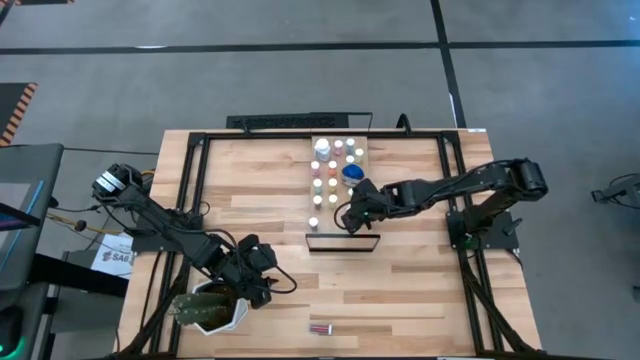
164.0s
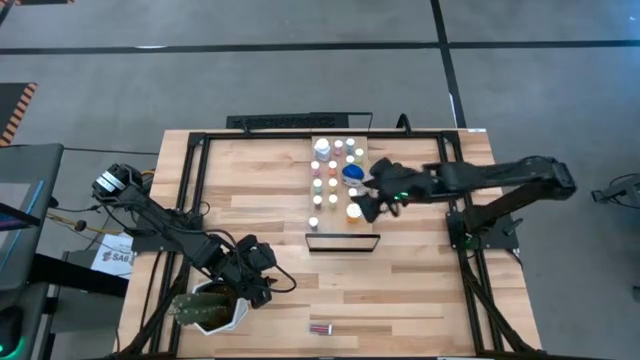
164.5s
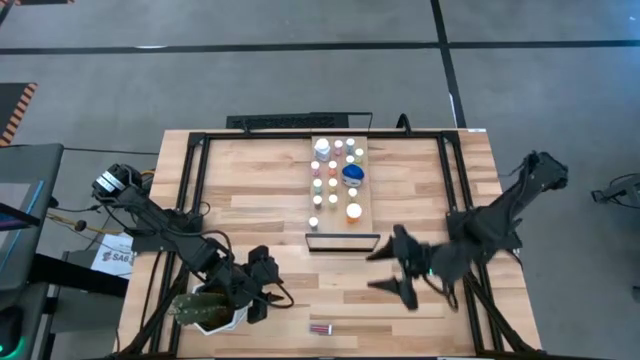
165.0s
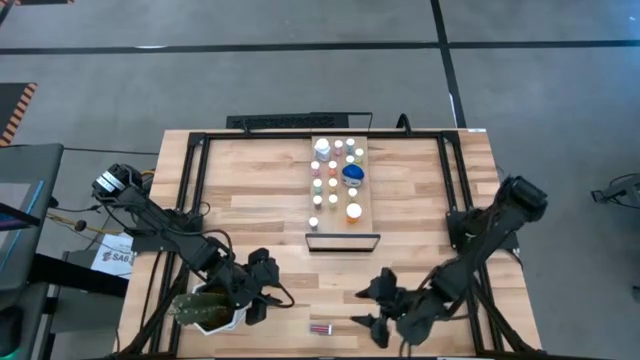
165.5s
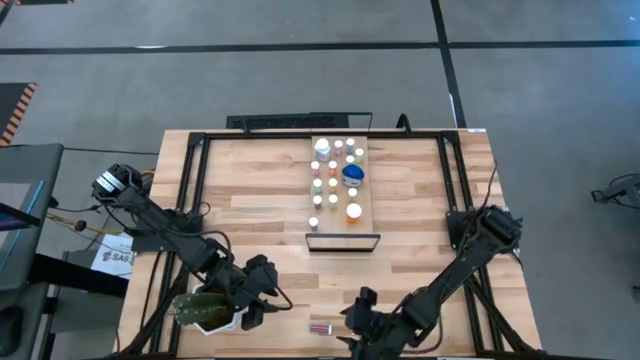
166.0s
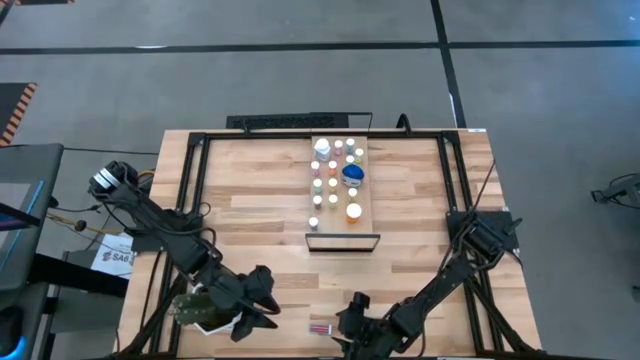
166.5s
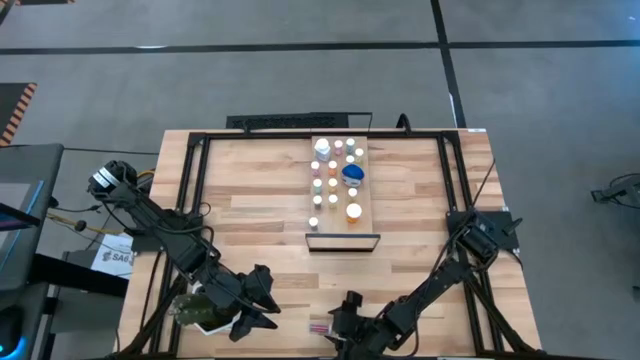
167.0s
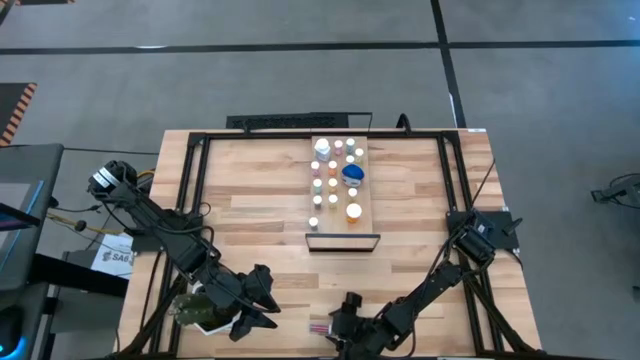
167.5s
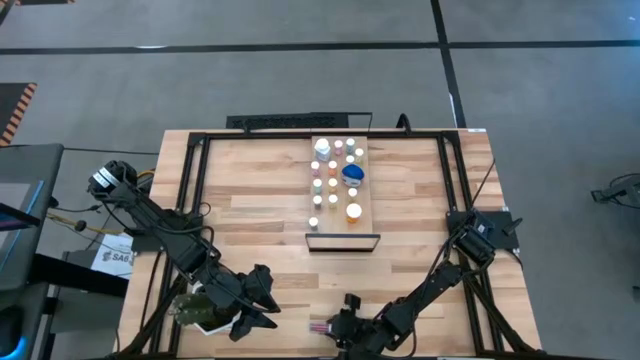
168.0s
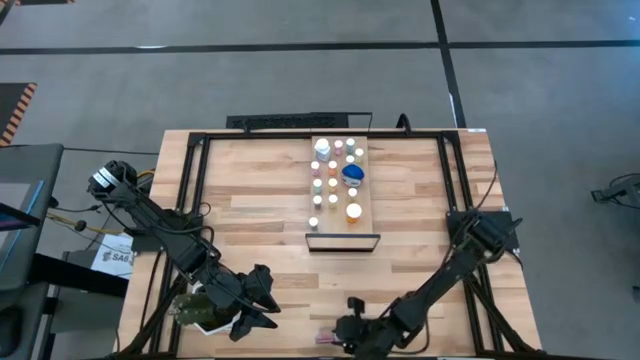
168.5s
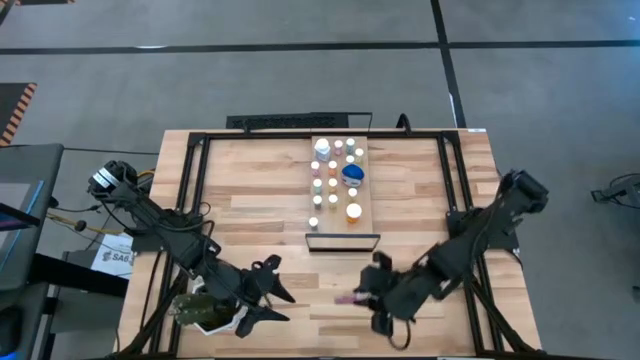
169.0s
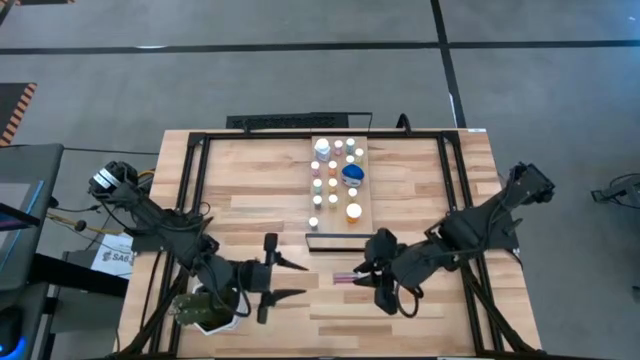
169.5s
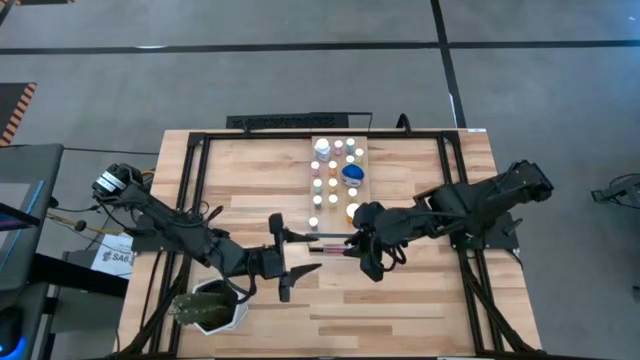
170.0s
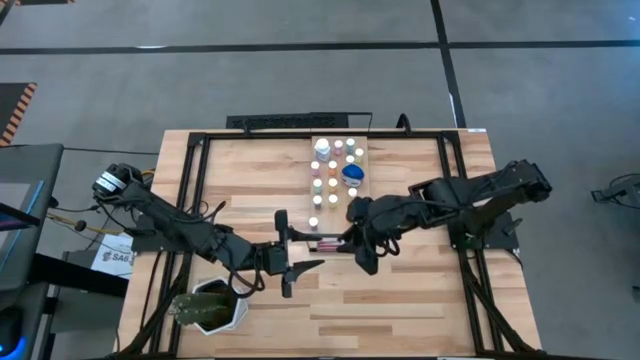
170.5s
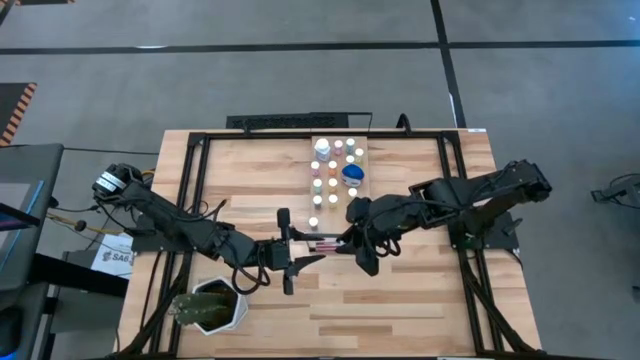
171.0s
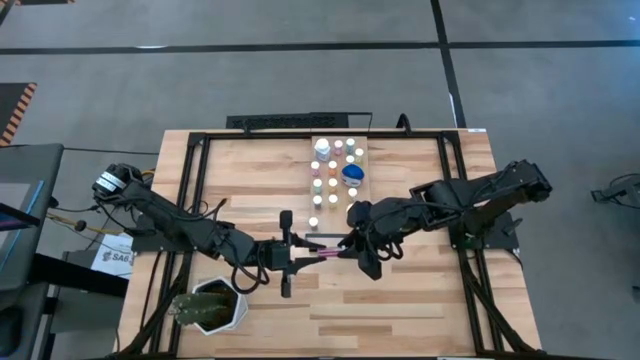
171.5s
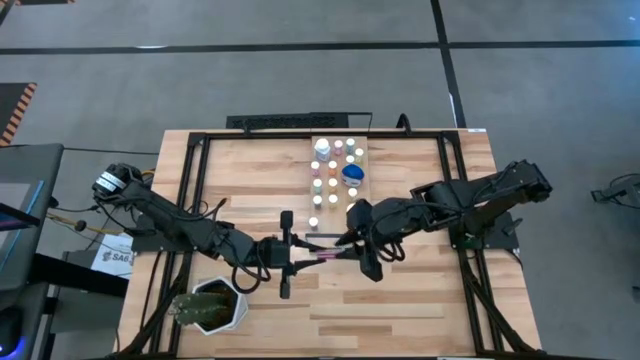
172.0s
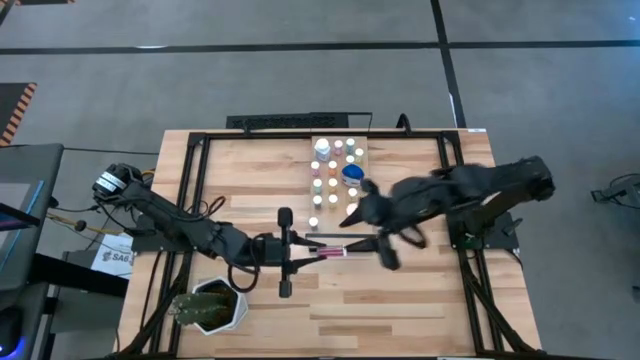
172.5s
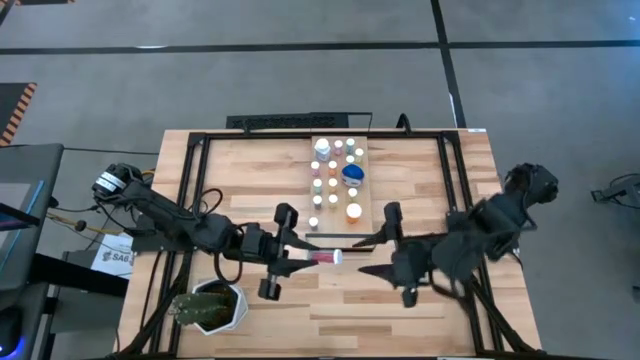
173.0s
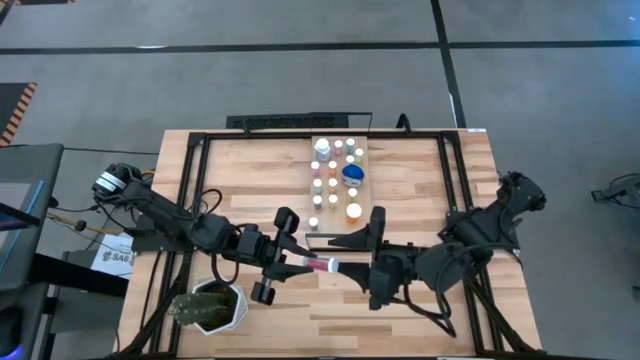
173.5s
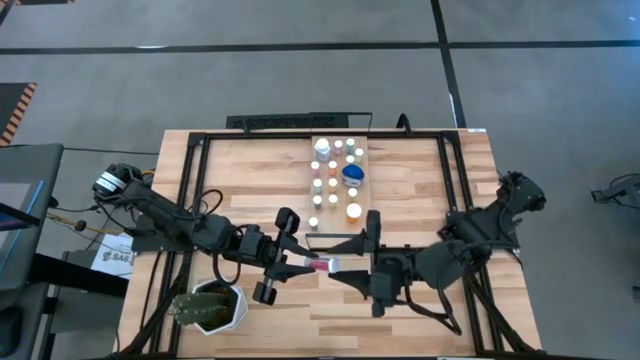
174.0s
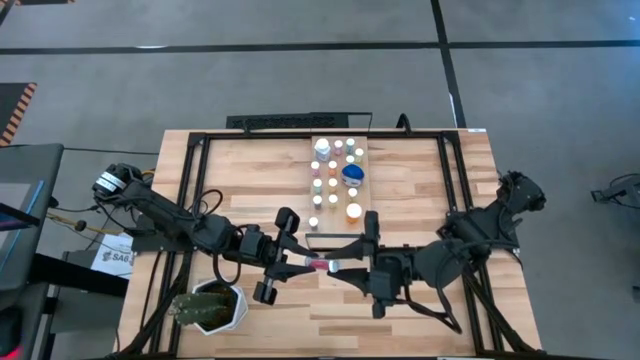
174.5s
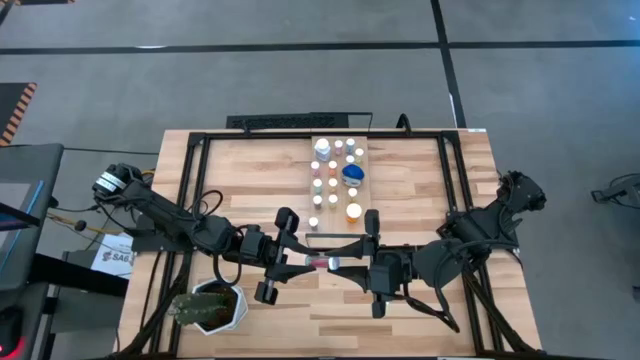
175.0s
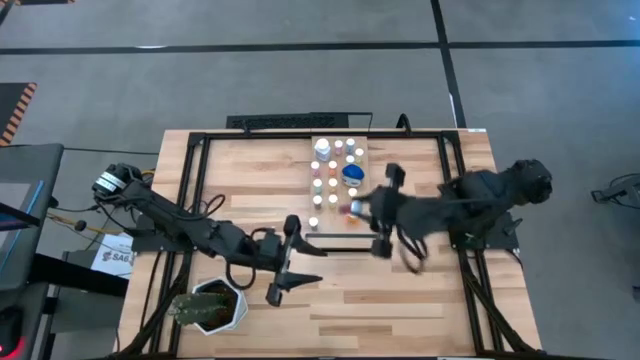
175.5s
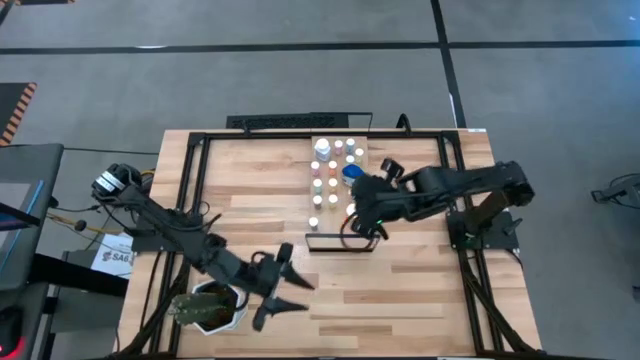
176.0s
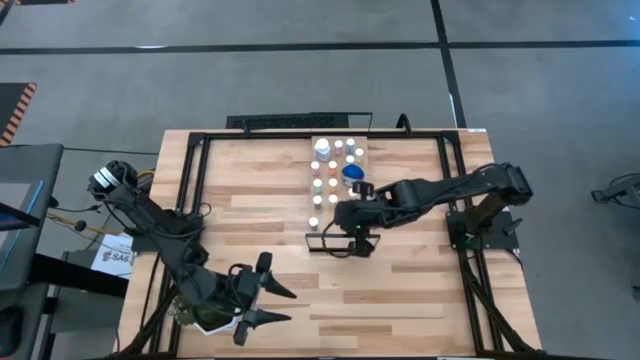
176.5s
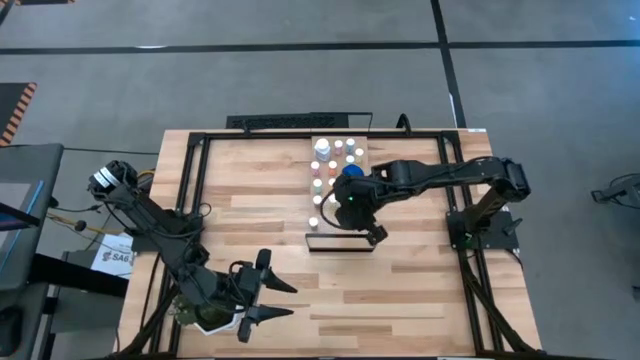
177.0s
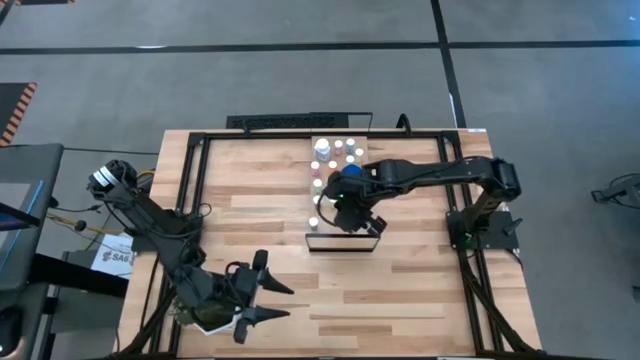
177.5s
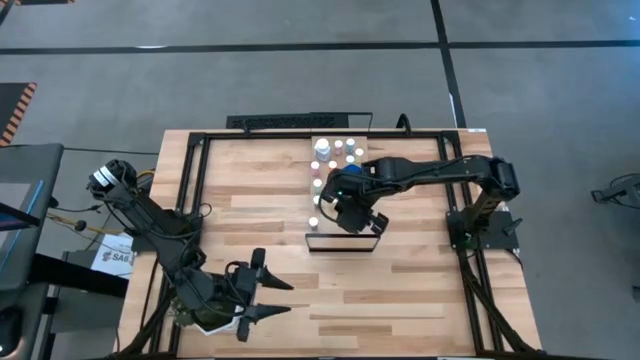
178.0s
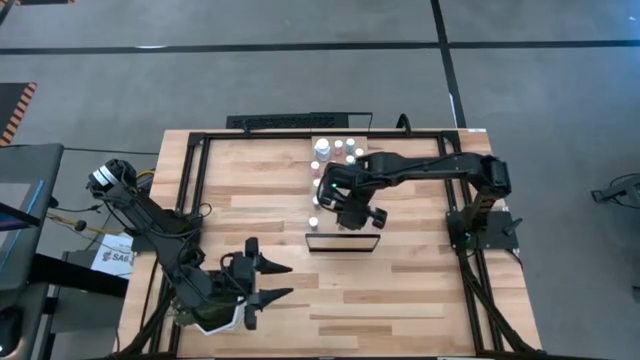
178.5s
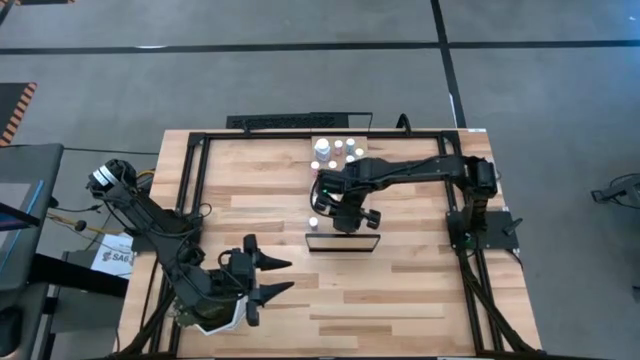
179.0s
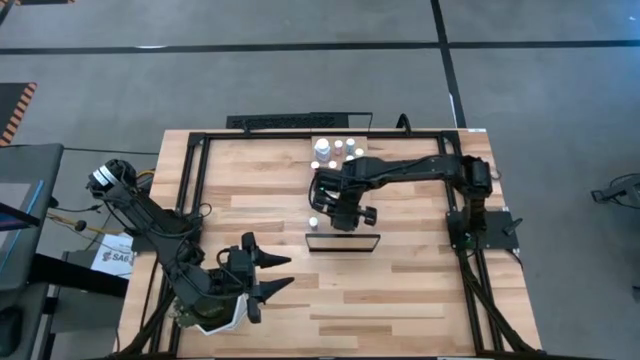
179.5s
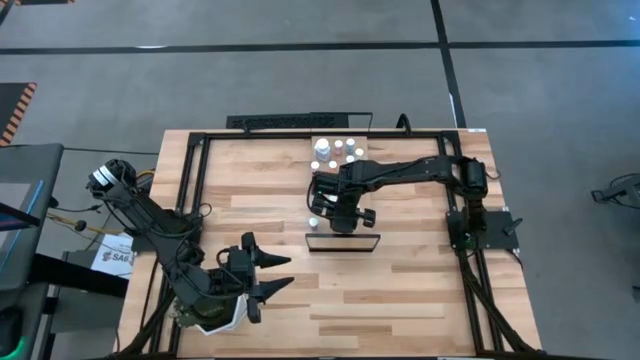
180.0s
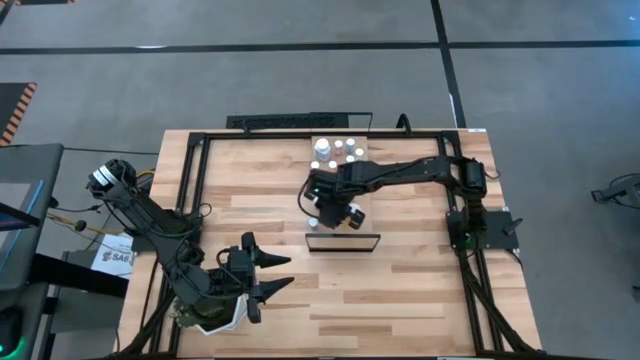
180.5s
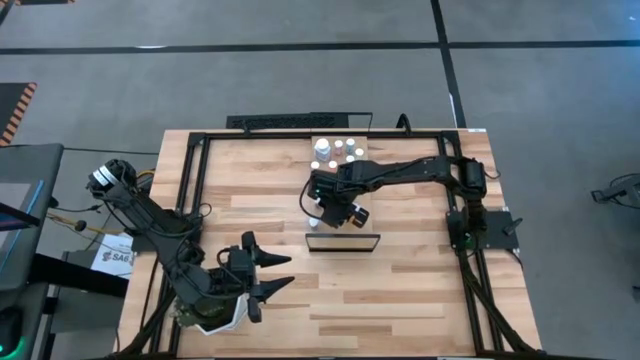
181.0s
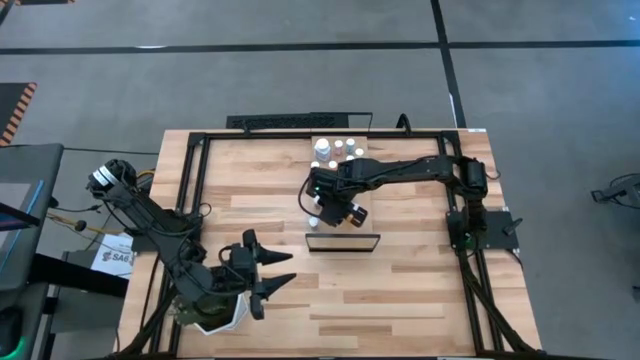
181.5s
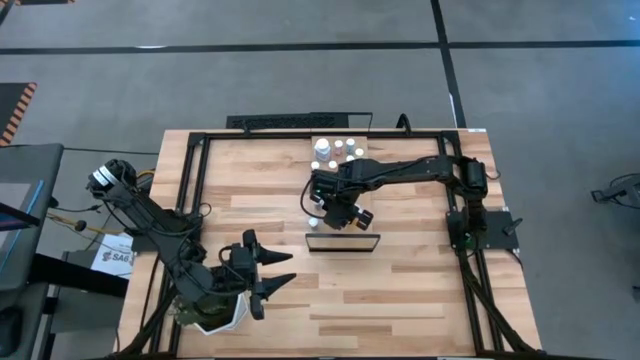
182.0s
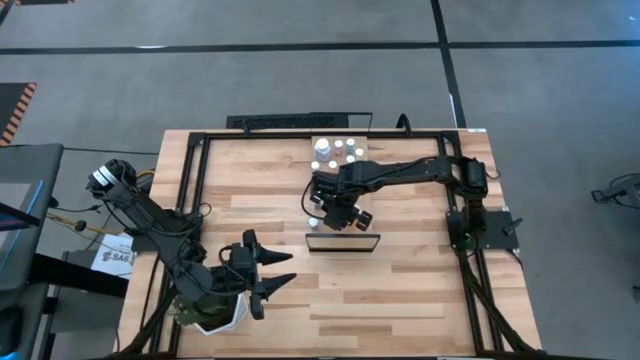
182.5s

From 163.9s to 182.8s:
Task: Pick and place medicine bottles onto shelf by color
Put the light blue pill bottle on the shelf

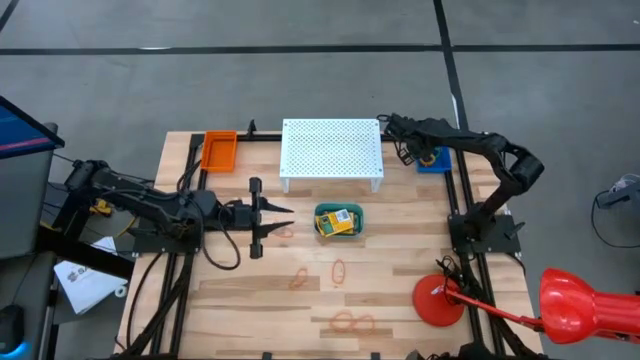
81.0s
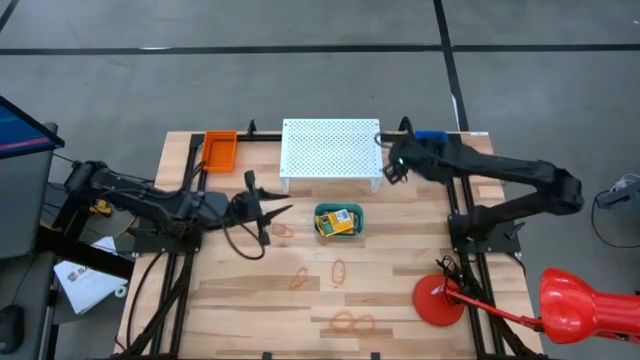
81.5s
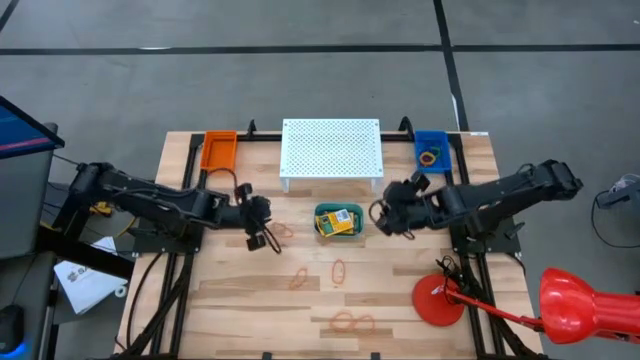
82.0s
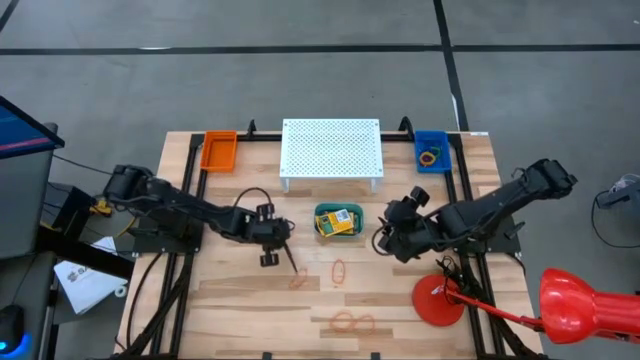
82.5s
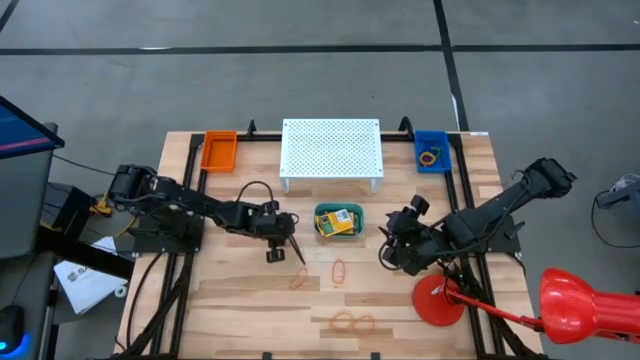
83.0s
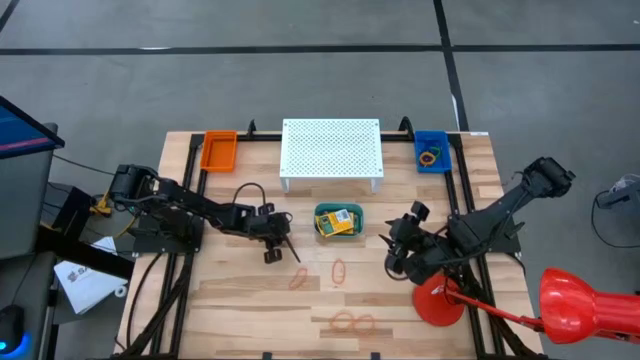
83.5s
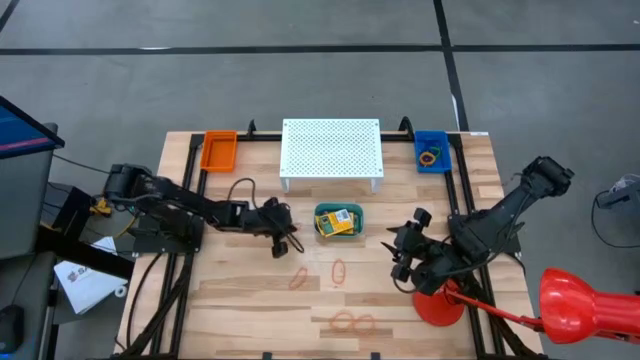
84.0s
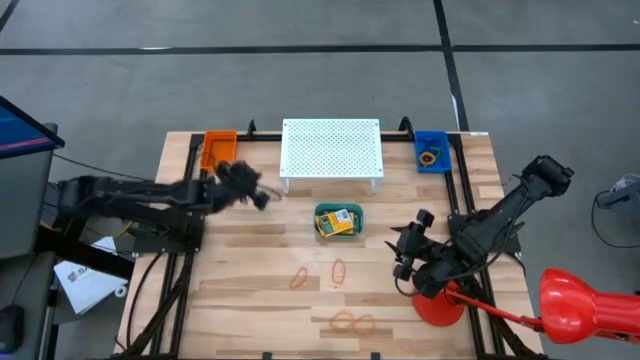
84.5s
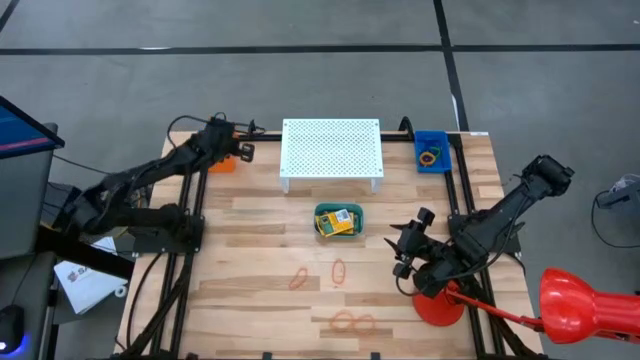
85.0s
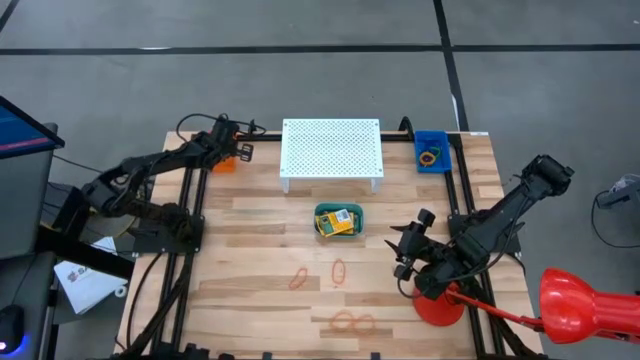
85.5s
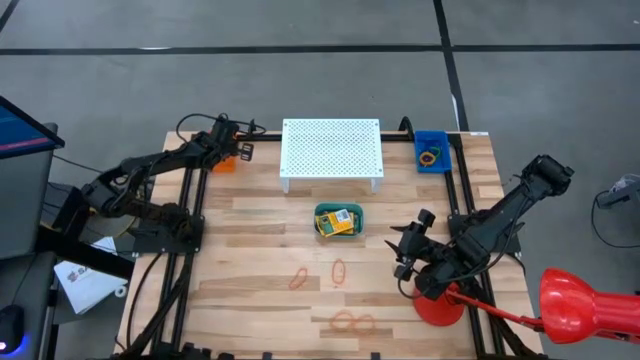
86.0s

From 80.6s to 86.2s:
Task: Pick & Place Office Desk Supplies
Put the orange rubber band into the orange bin
